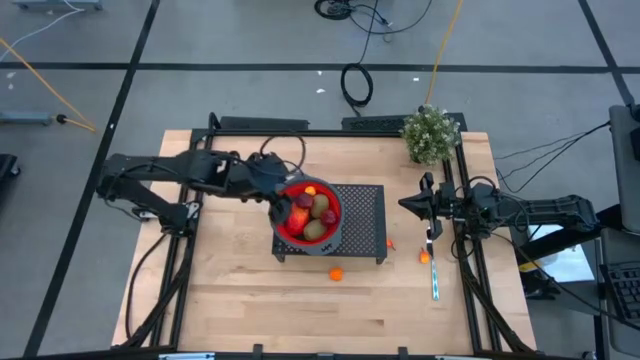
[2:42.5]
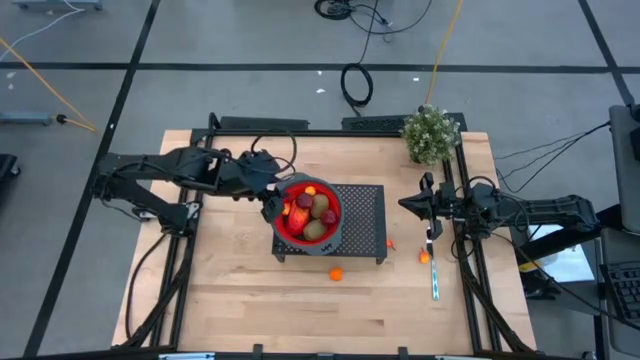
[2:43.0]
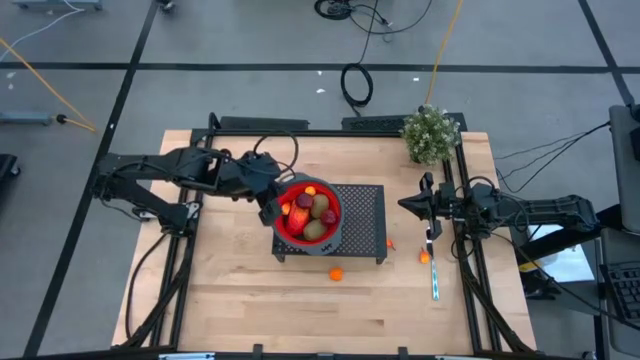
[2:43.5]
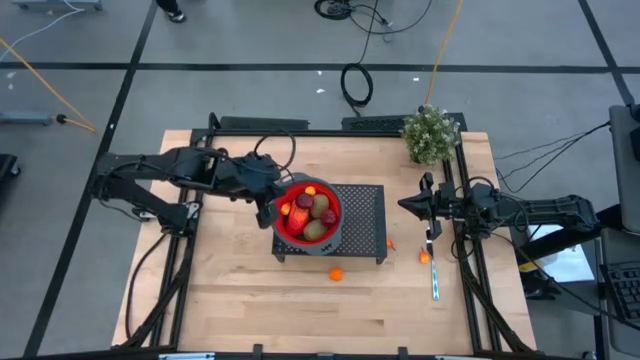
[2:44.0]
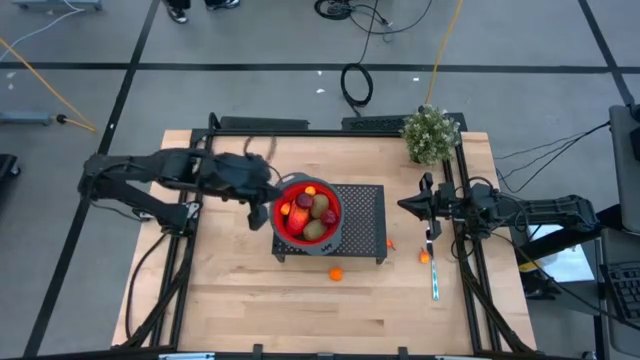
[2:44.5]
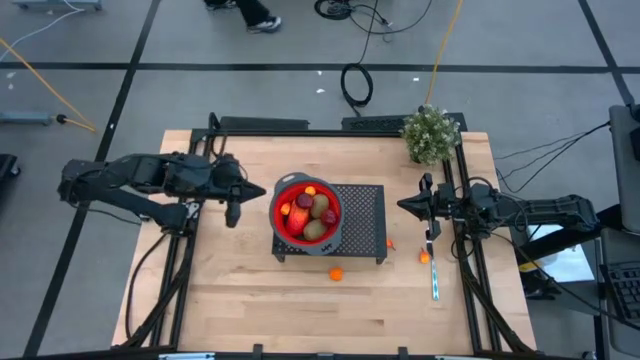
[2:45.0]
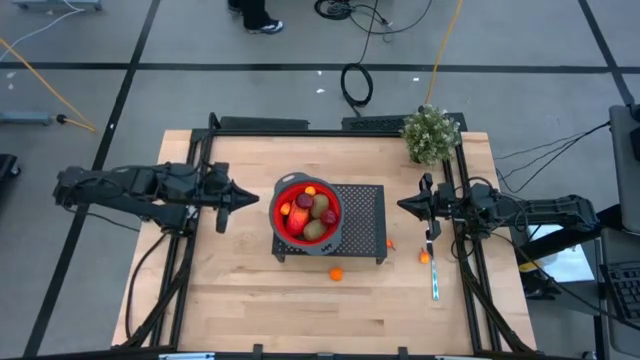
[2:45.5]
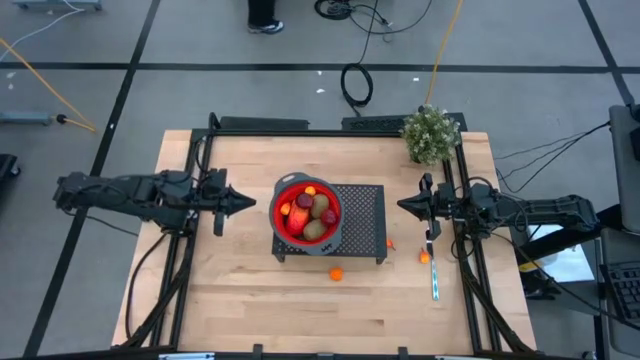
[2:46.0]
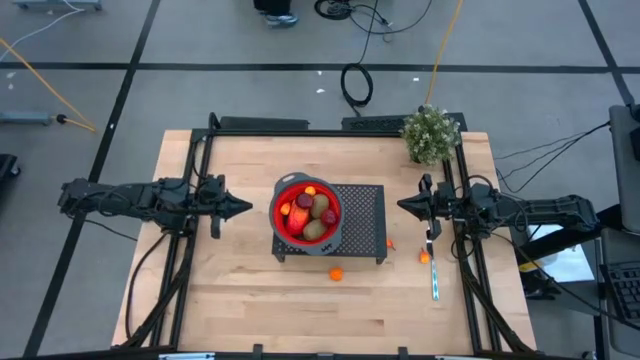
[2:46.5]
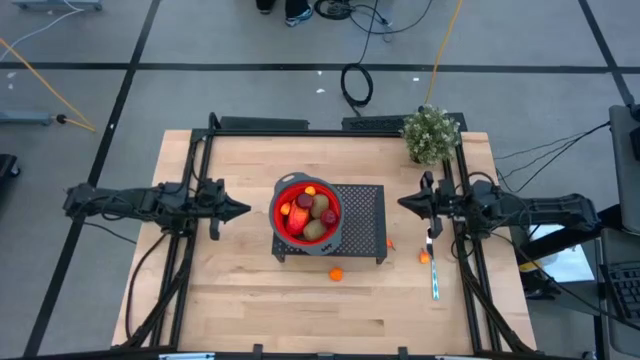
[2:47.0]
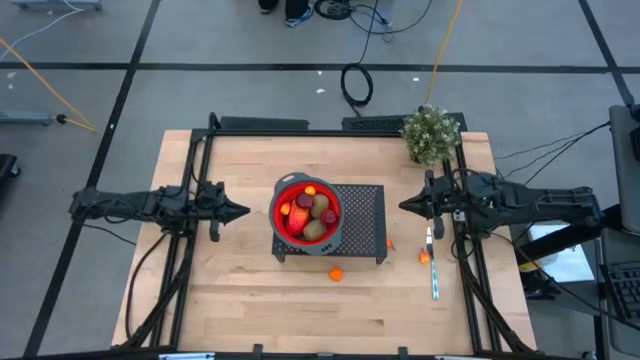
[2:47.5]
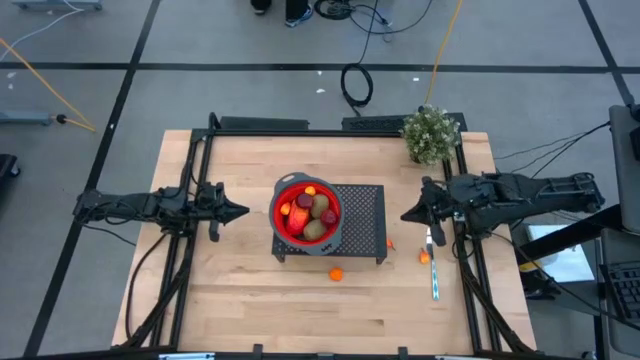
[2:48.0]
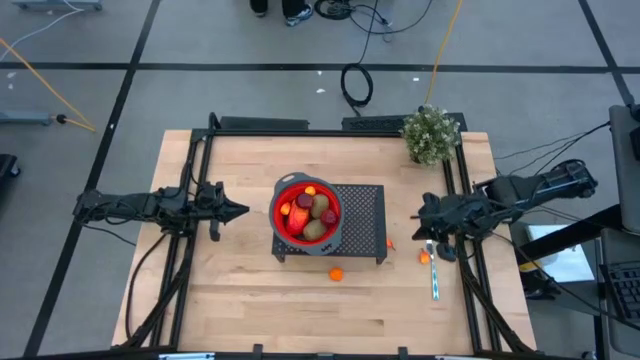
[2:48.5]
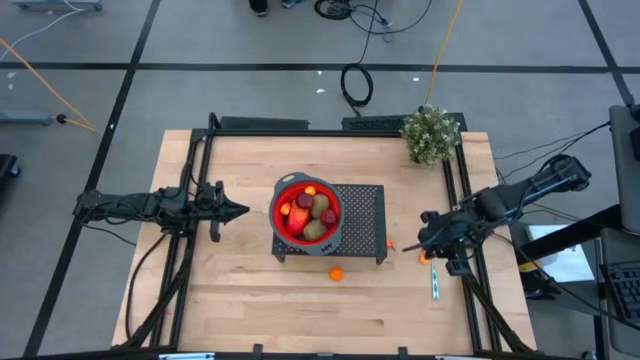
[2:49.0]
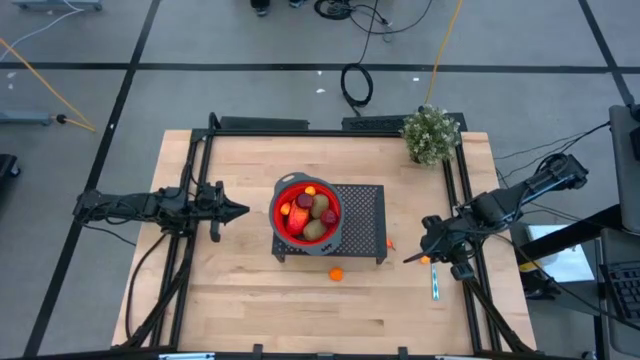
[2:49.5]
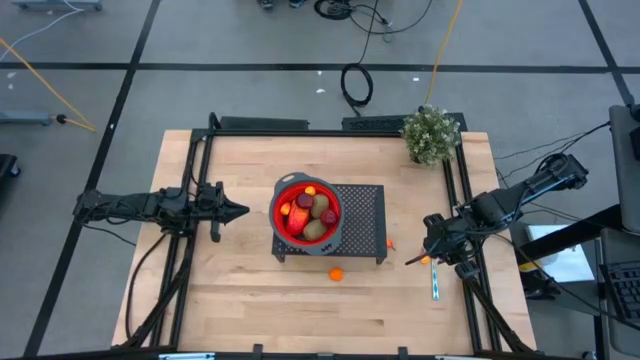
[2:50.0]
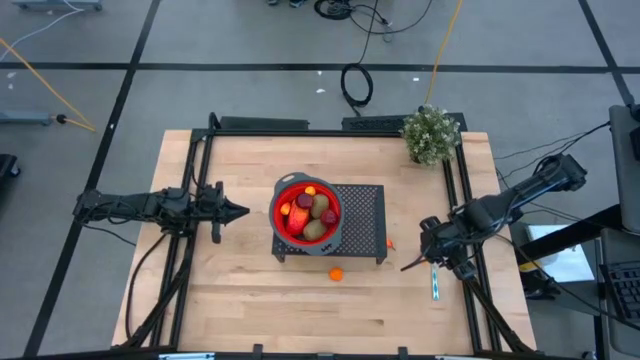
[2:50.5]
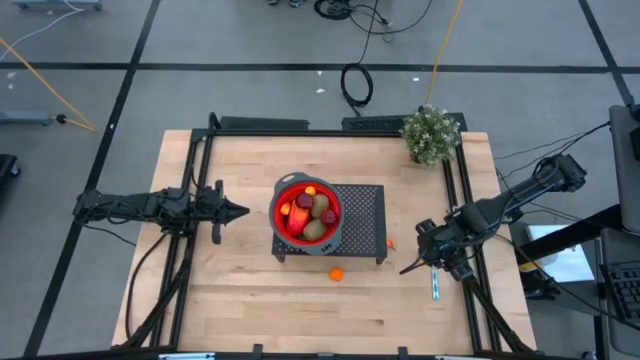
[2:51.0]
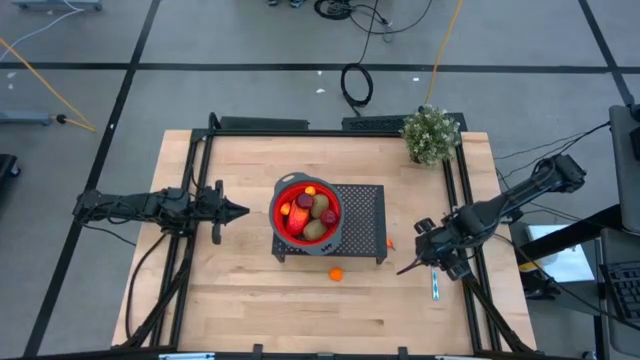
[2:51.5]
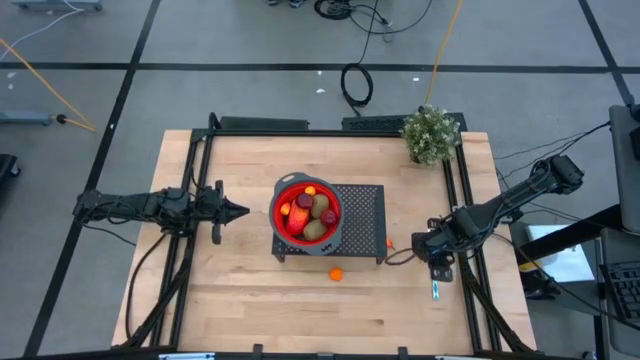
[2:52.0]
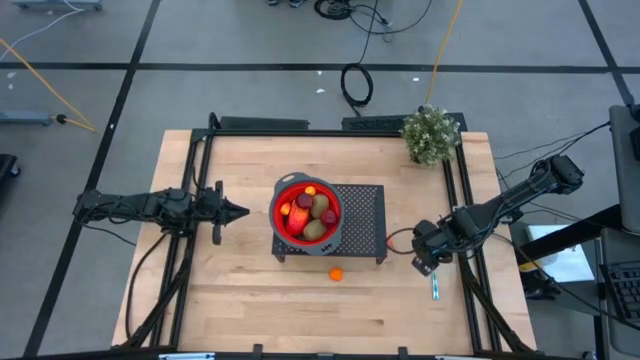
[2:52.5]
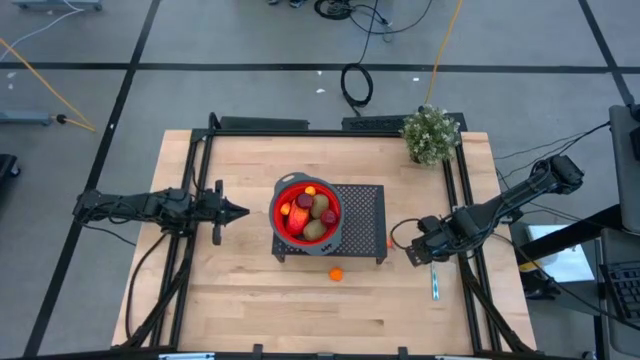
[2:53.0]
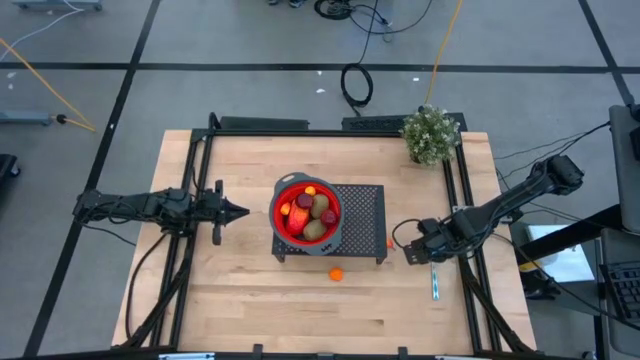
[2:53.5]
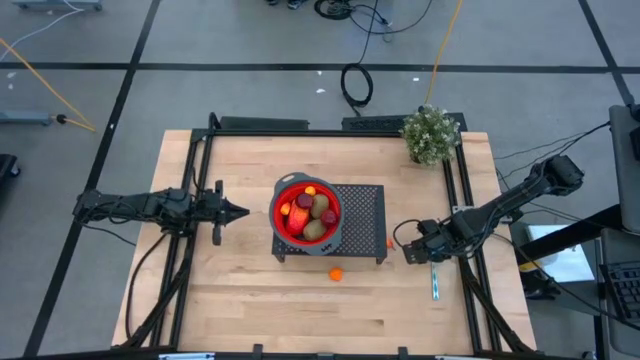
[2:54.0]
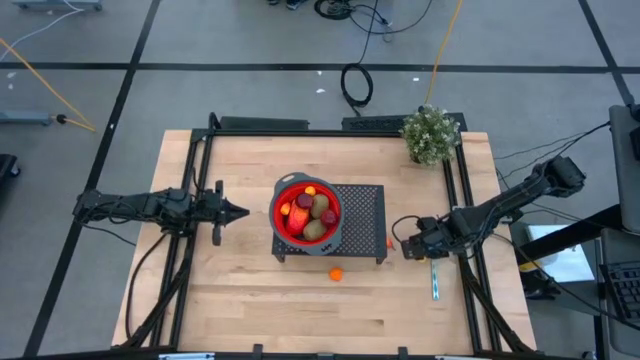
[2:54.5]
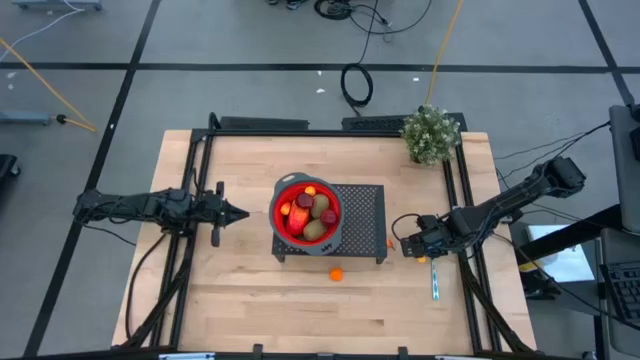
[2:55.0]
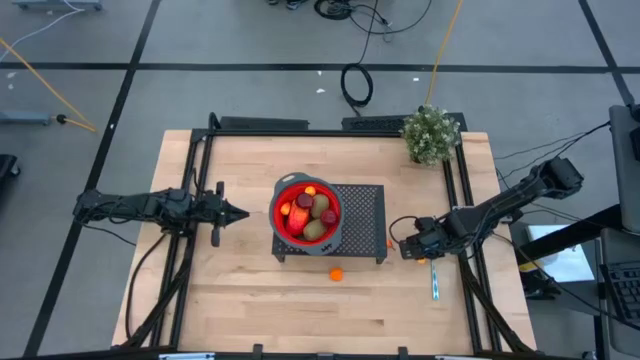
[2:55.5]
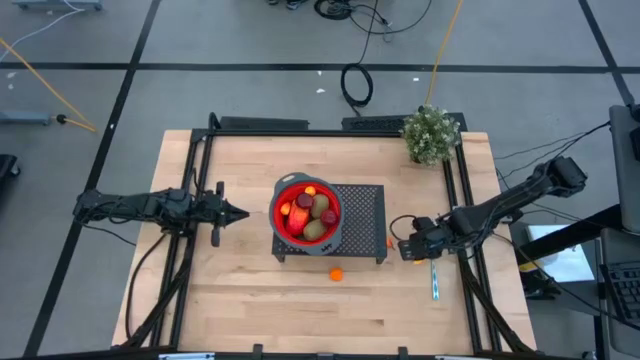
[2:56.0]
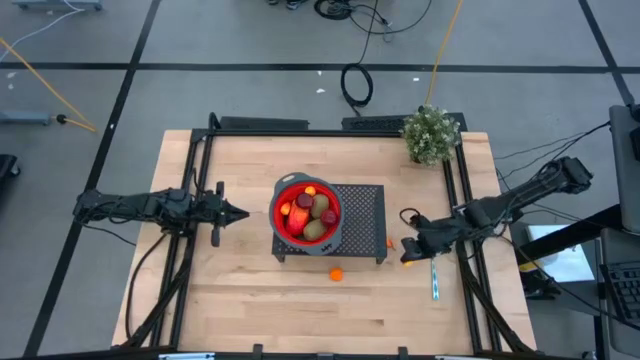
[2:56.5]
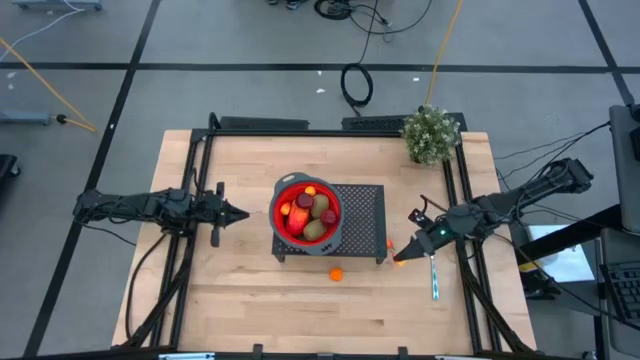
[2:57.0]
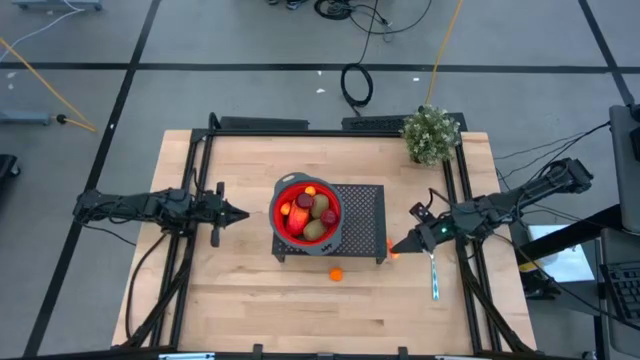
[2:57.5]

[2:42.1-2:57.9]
Task: Pick & Place Fruit
Put the peach into the red colander on the shelf

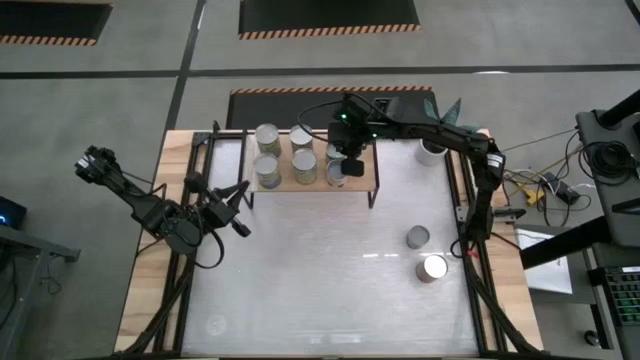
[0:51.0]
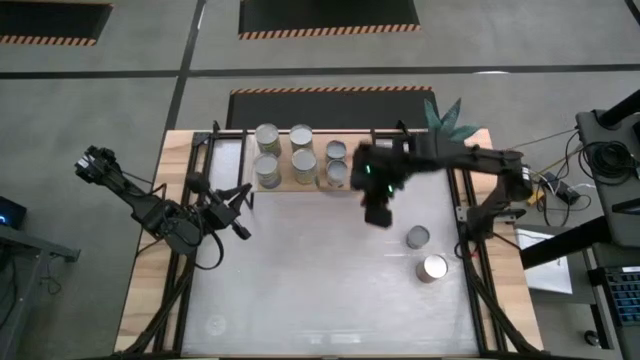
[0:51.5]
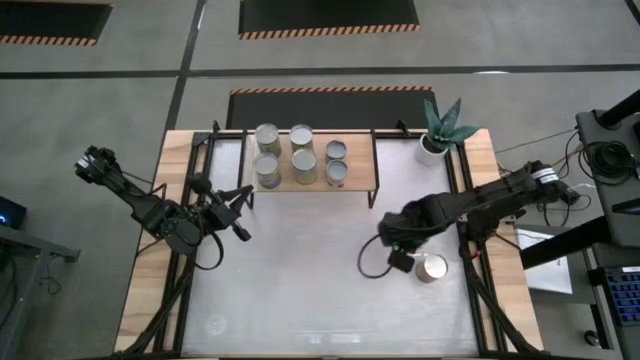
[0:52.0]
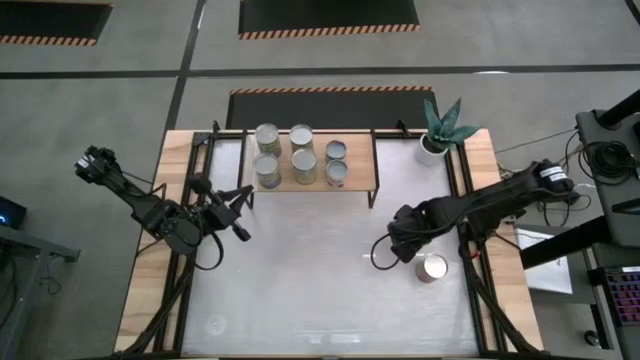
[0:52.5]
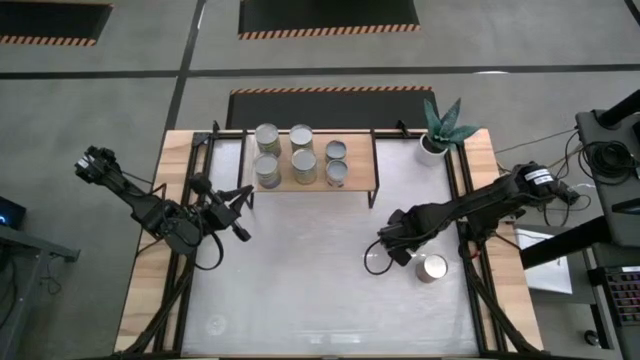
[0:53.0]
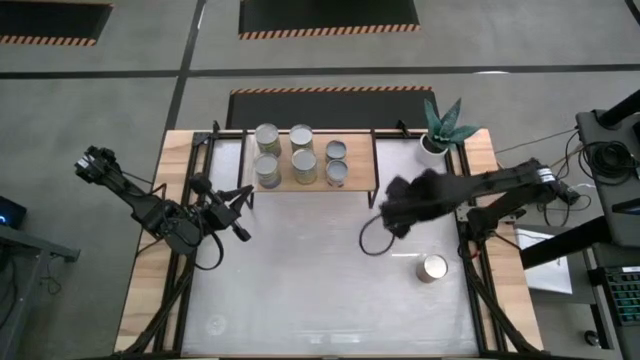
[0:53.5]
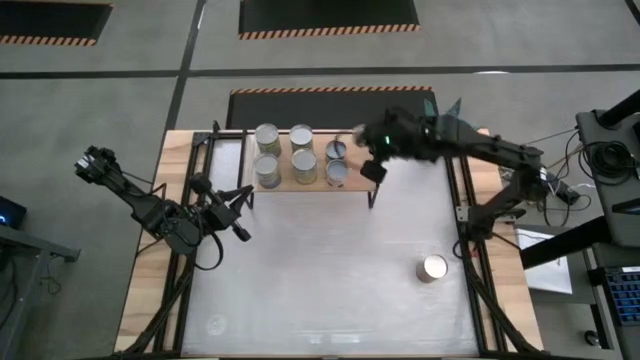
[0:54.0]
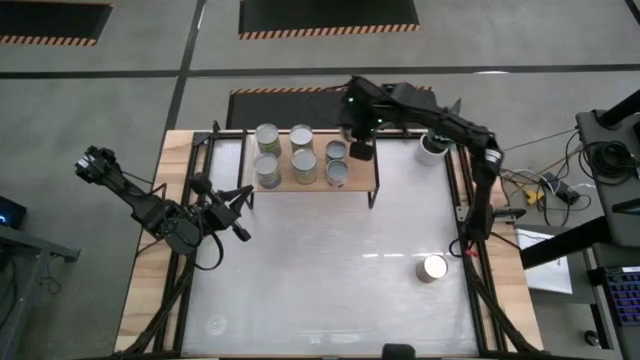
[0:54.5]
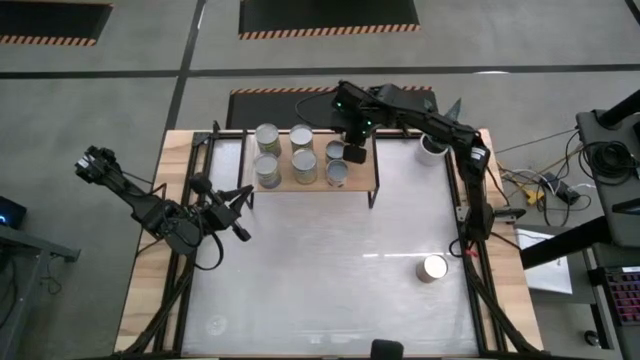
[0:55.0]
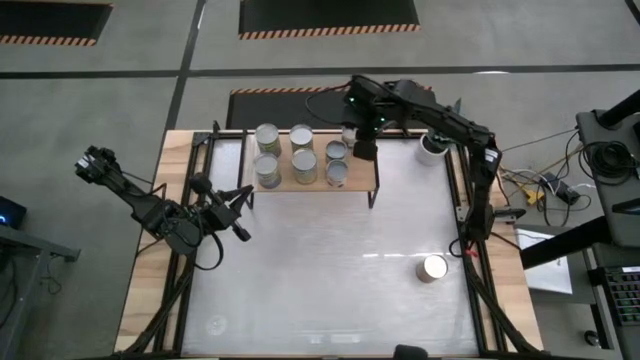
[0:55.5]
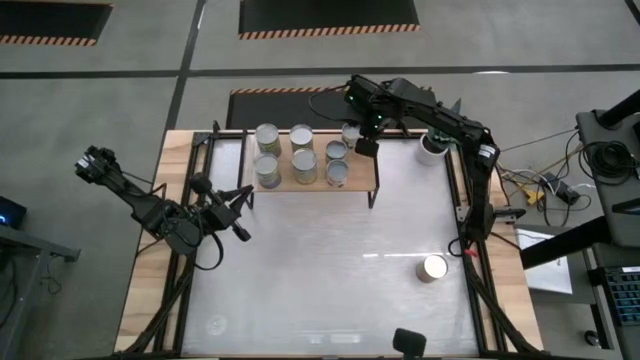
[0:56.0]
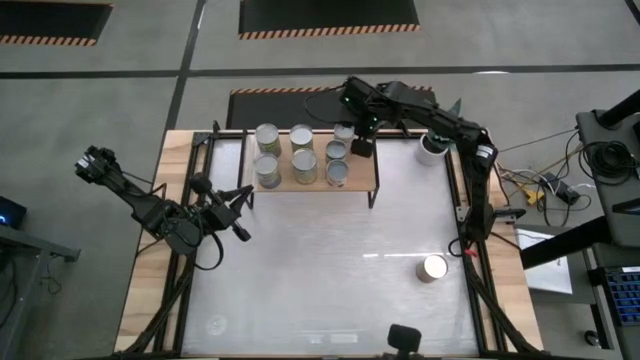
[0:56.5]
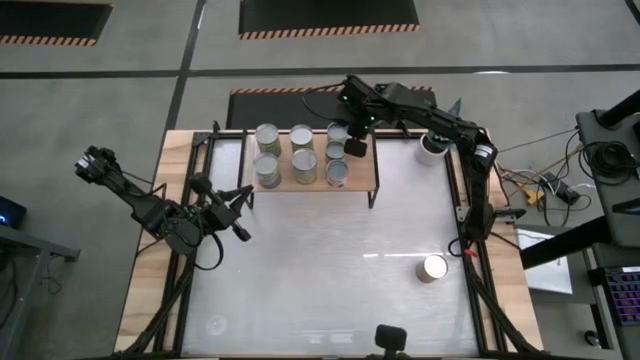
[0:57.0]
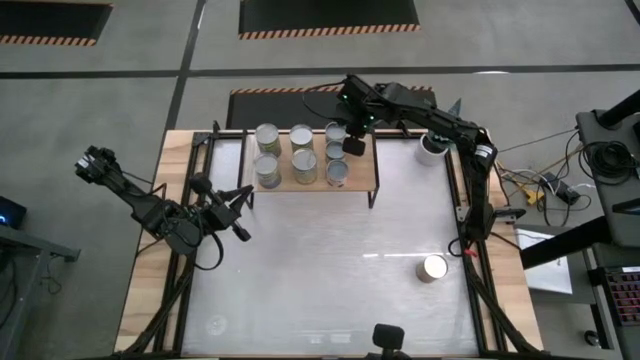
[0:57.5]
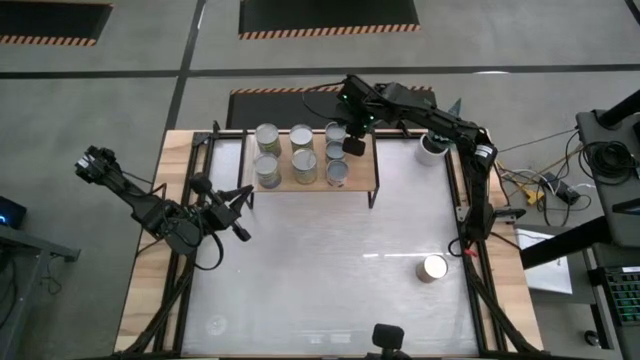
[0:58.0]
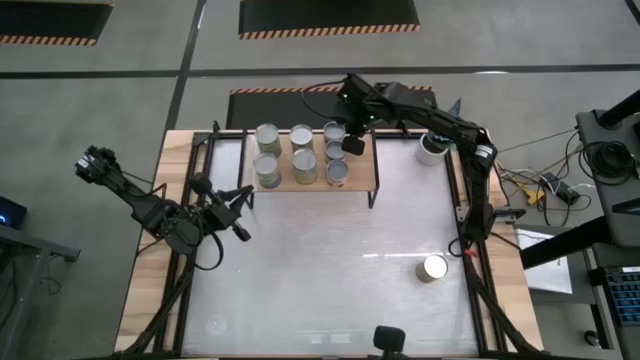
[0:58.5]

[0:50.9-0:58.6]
Task: Pick and place cans onto a shelf
Put the small canned peas on the shelf
